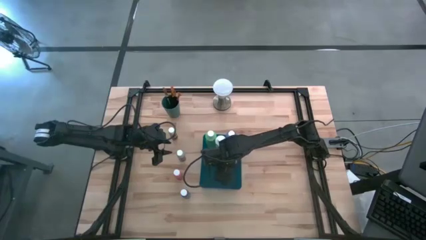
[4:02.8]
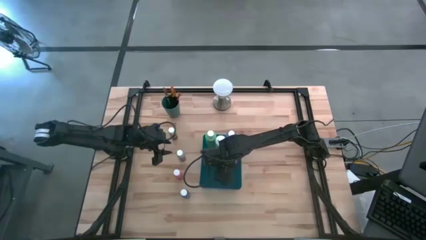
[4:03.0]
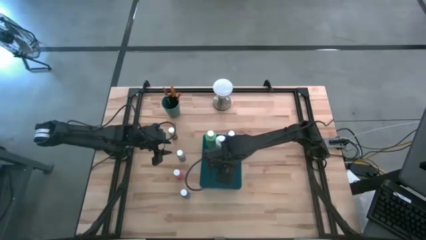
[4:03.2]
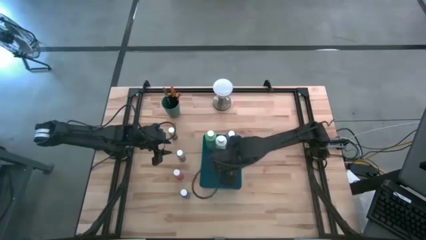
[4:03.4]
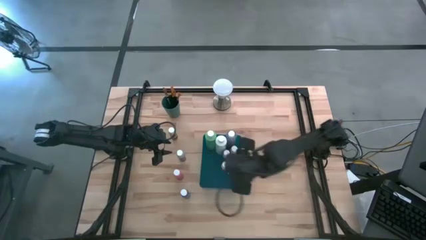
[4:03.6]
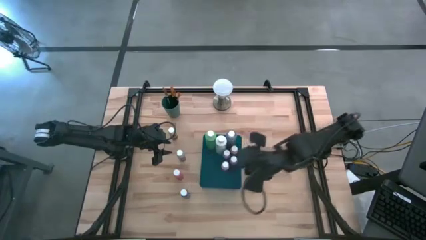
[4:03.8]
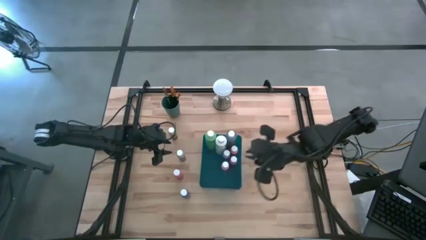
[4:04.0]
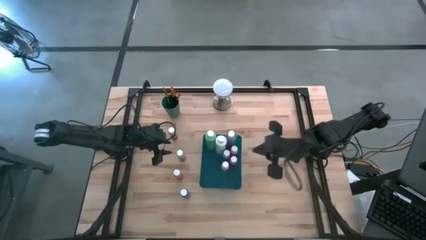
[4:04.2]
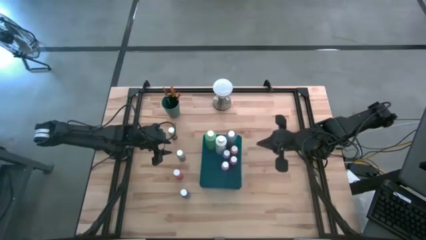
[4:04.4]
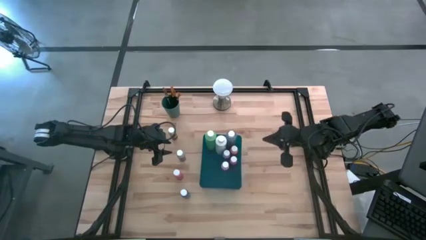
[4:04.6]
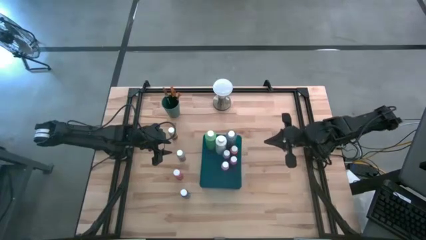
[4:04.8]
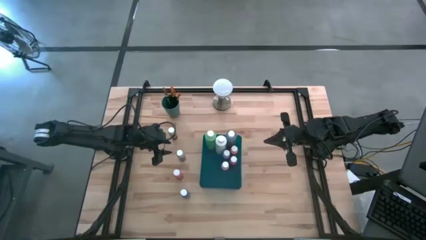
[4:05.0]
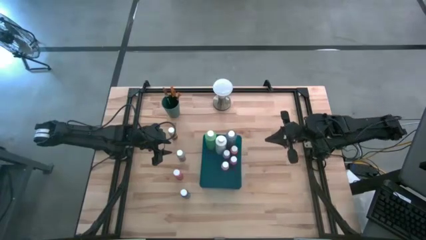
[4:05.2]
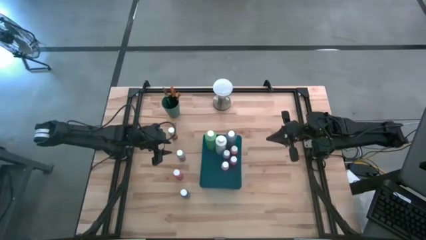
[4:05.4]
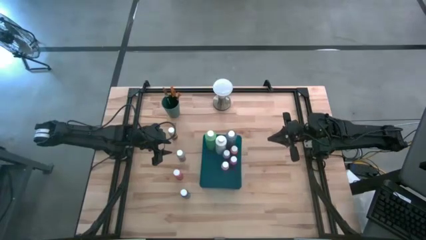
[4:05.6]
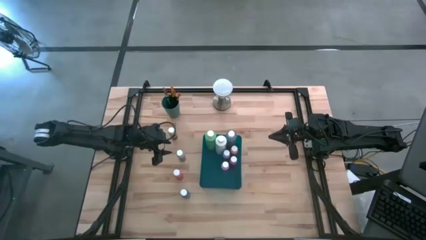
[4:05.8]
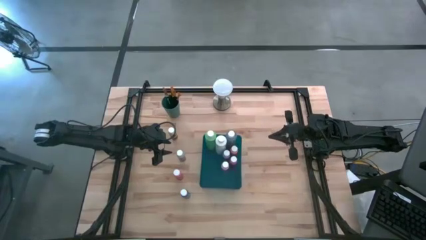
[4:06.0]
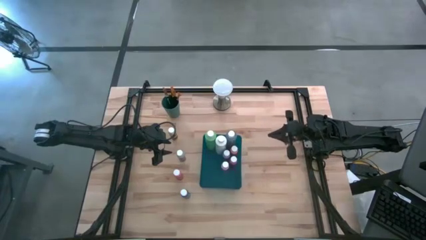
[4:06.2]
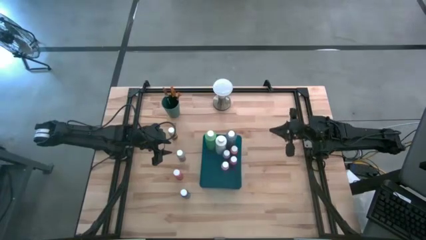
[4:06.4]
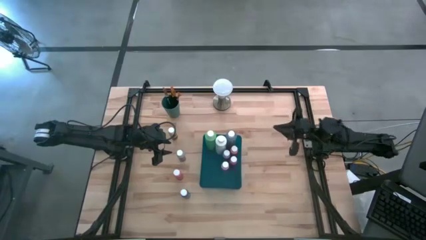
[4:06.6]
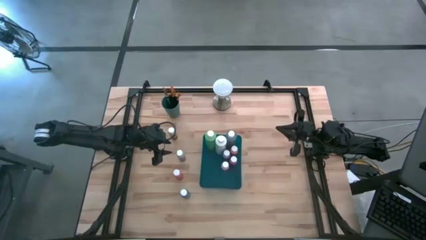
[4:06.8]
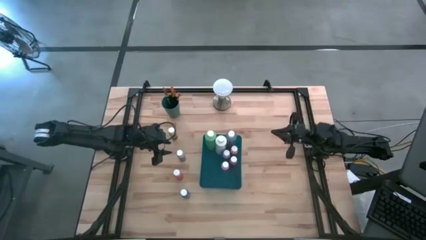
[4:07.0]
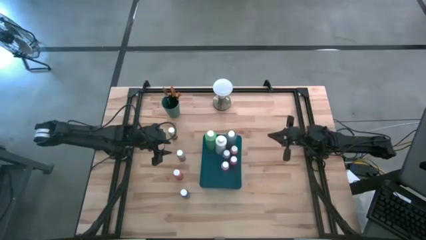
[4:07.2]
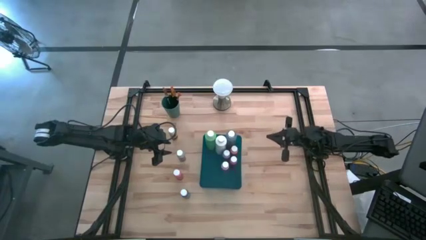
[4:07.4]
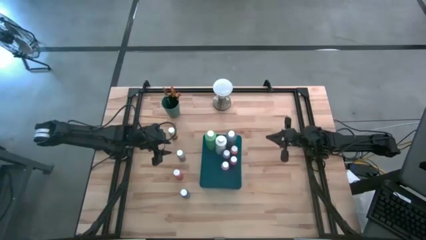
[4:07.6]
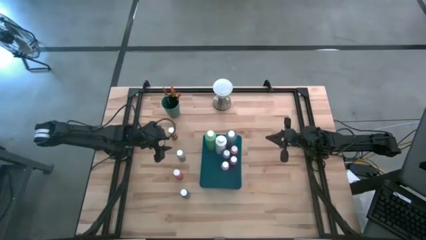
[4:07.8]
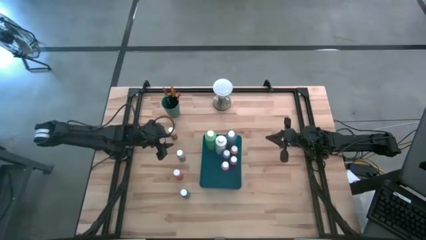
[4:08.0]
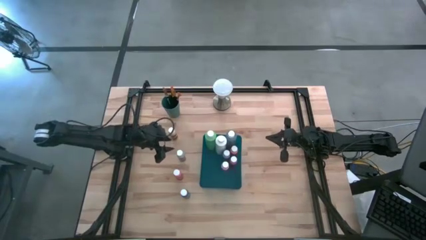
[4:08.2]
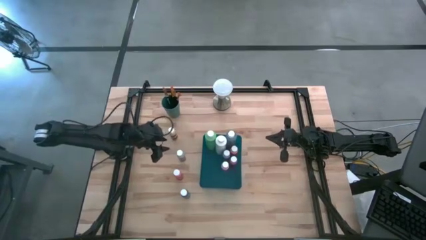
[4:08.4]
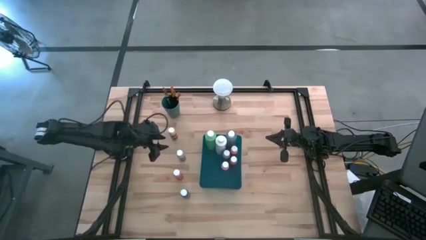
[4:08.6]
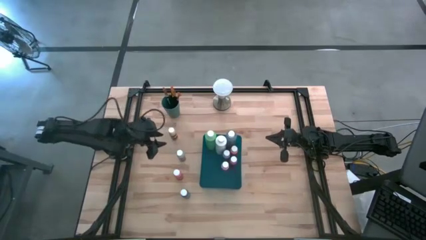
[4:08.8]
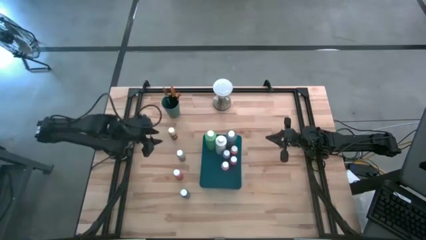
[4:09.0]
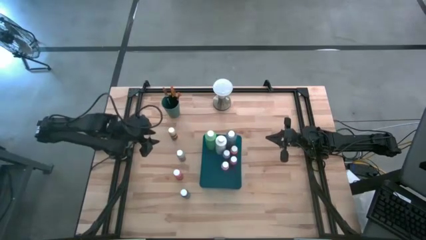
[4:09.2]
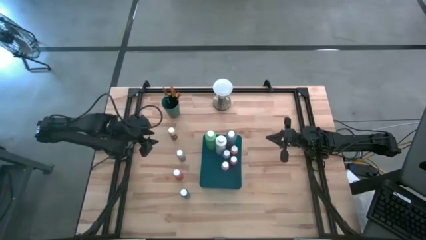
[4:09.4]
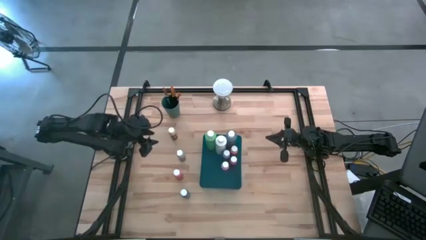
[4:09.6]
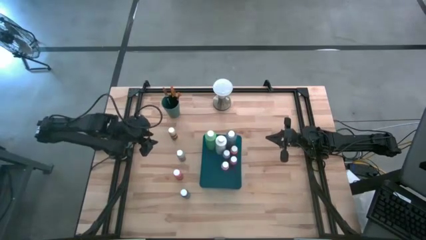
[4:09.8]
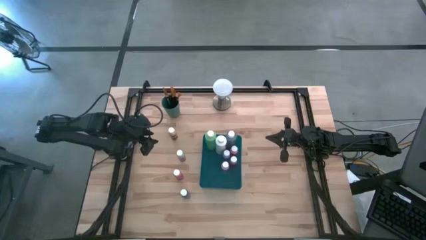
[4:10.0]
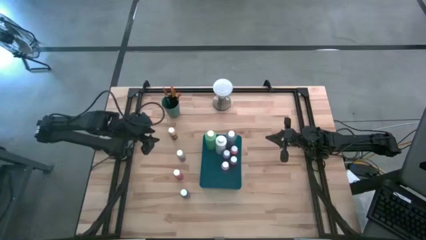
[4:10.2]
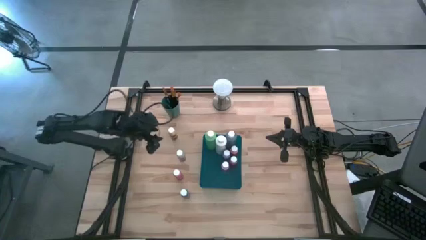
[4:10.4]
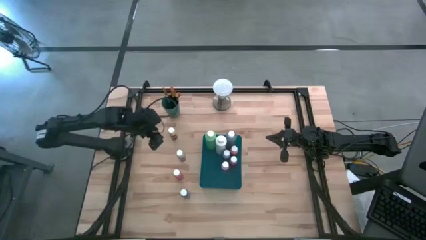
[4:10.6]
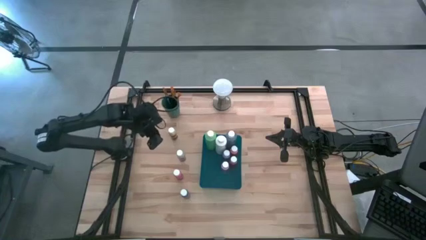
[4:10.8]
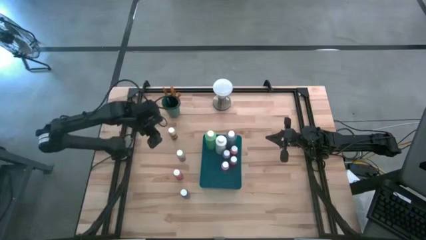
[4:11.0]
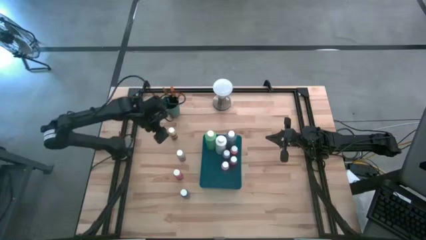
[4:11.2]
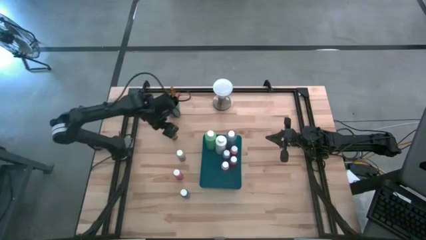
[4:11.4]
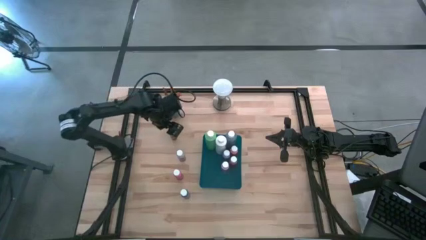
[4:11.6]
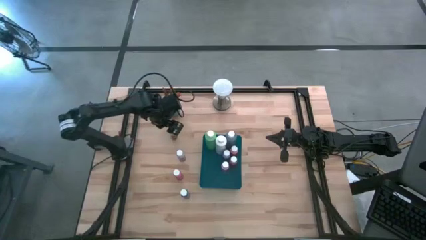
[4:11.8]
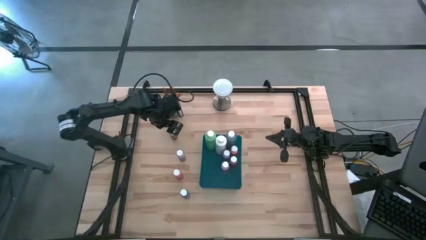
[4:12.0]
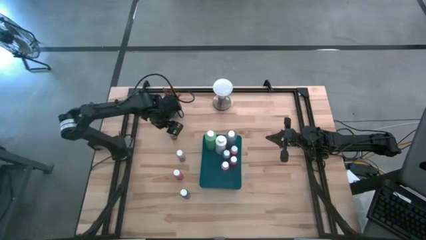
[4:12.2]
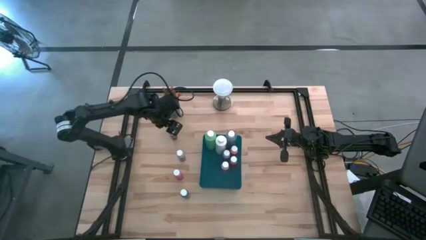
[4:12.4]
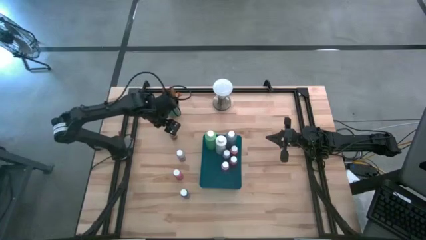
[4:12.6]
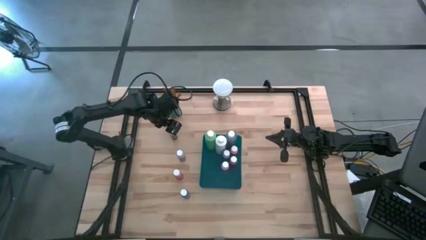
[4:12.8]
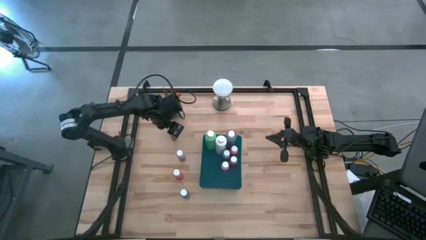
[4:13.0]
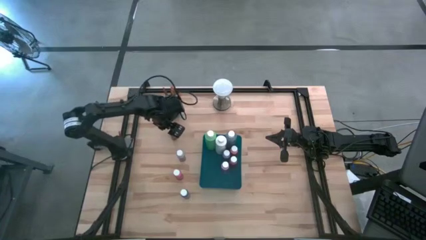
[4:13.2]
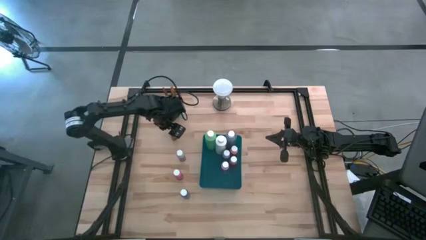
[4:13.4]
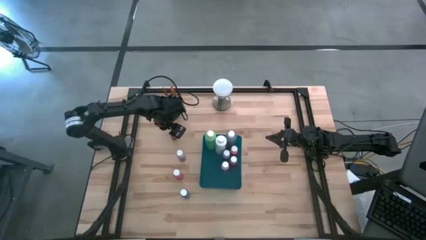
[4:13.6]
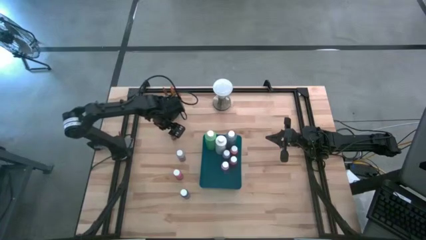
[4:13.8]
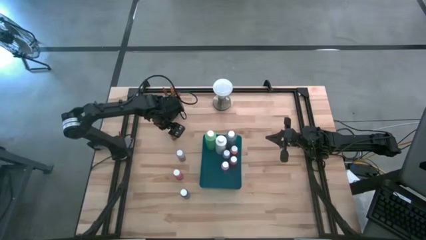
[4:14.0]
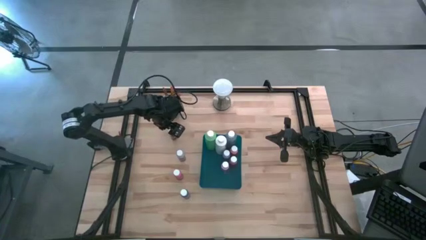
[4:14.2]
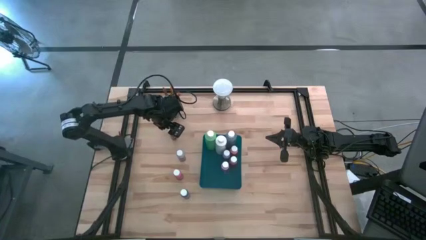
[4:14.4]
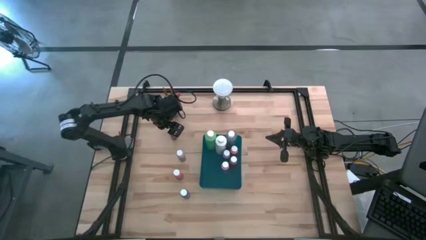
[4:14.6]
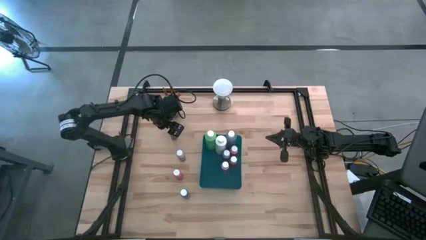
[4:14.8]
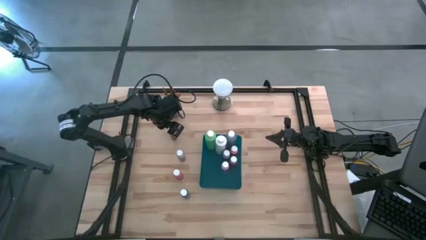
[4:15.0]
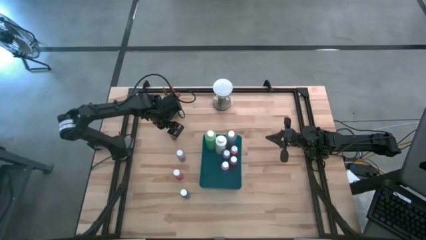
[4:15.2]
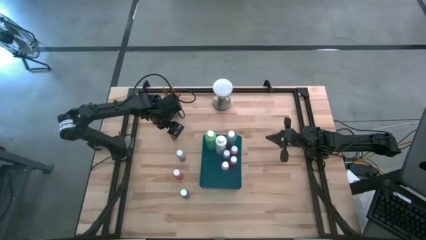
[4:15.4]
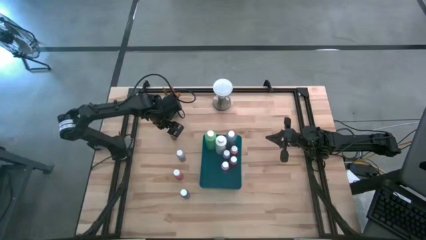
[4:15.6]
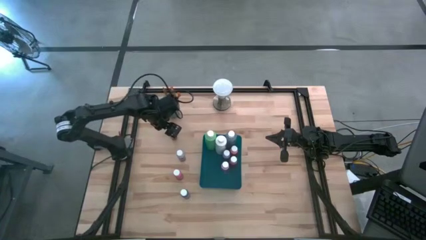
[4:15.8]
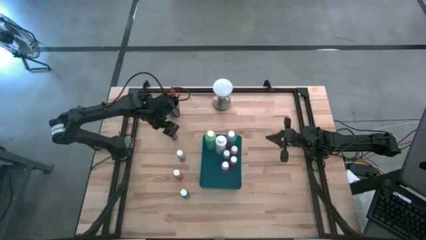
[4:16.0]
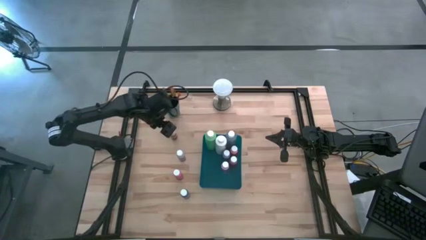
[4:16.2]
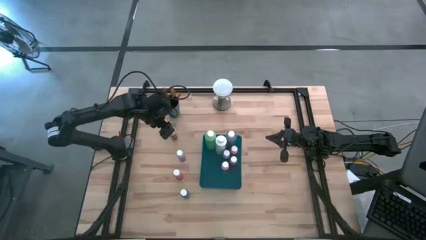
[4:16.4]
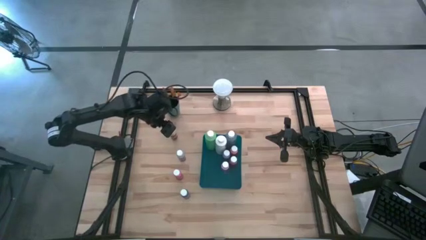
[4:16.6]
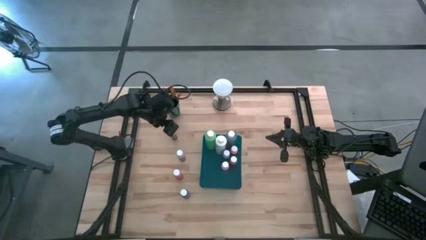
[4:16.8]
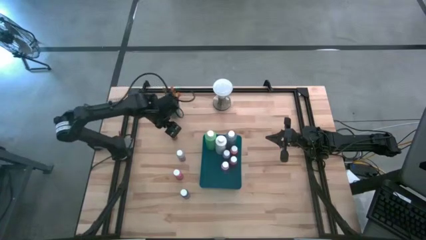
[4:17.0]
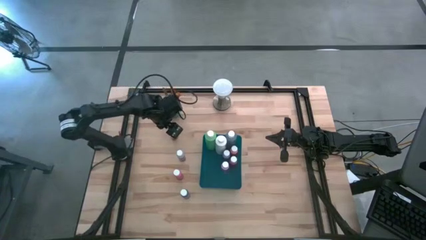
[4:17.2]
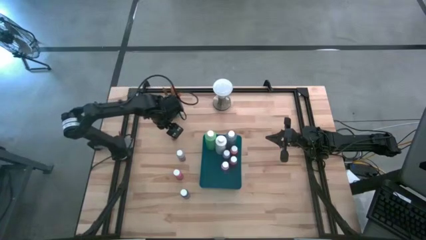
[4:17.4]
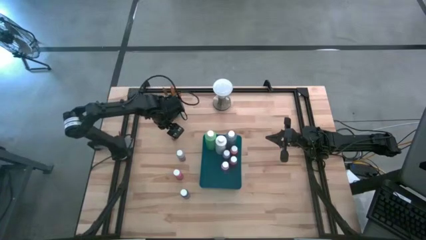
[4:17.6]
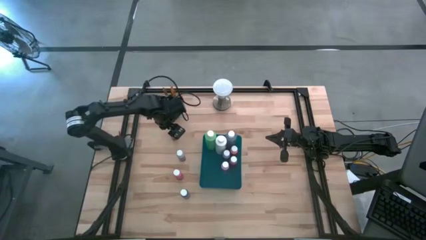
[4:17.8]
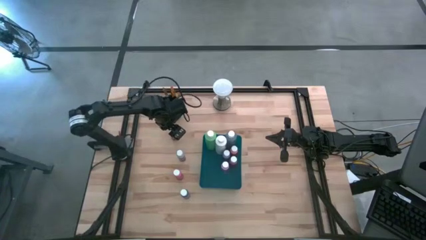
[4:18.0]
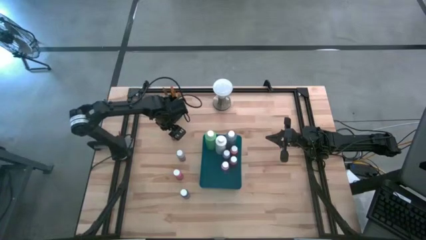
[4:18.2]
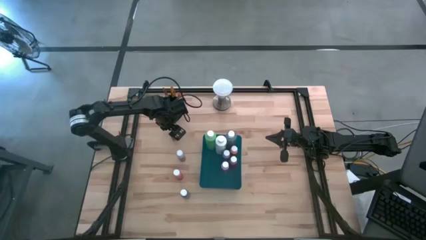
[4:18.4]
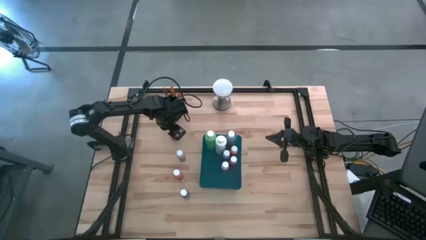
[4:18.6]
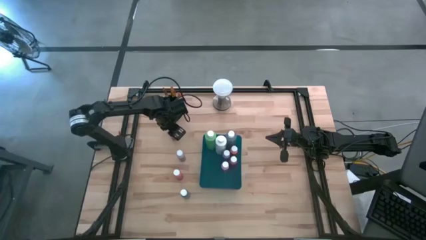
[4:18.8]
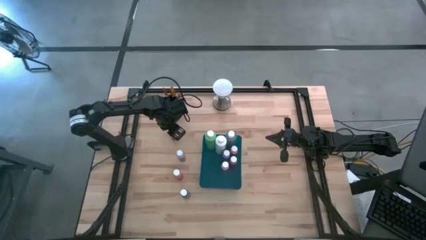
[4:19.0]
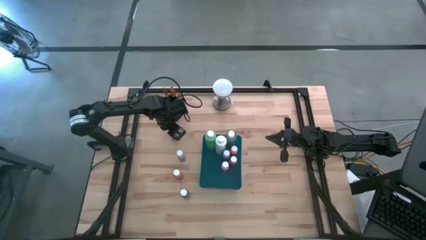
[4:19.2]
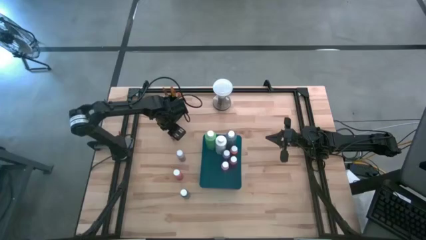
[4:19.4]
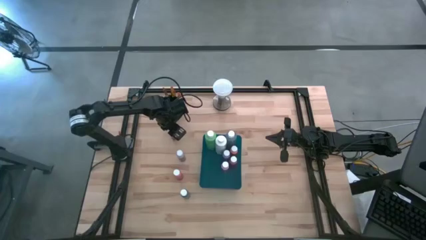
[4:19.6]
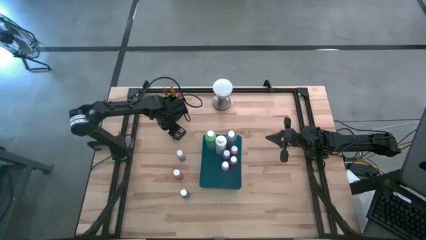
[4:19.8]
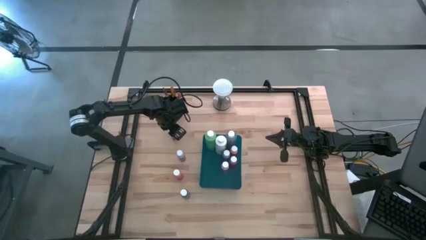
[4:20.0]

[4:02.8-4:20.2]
Task: Pick & Place Paint Supplies
Put the yellow paint bottle into the blue bin
